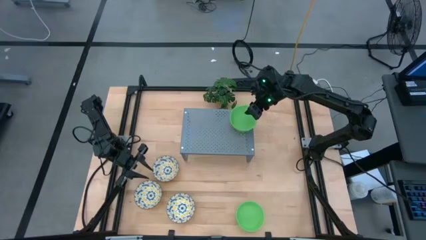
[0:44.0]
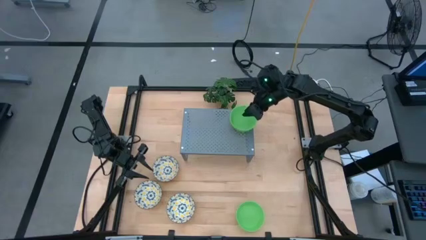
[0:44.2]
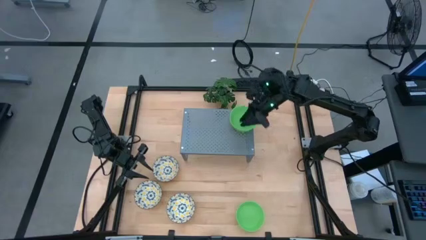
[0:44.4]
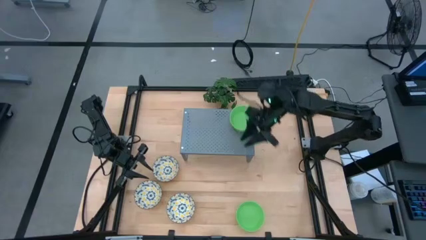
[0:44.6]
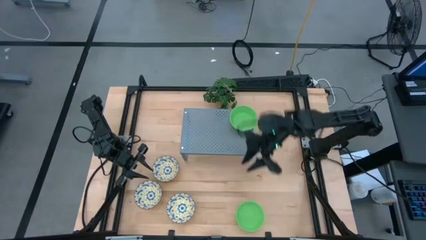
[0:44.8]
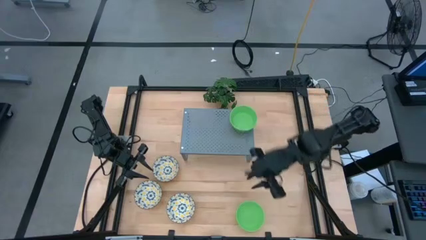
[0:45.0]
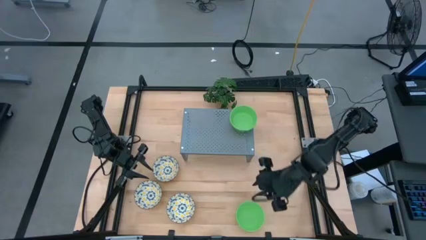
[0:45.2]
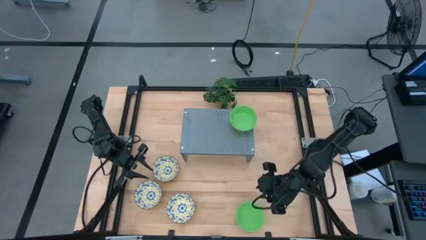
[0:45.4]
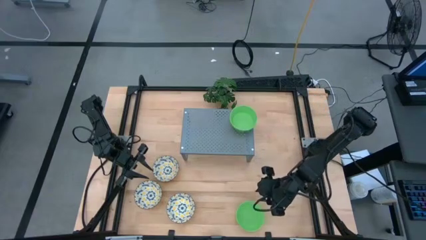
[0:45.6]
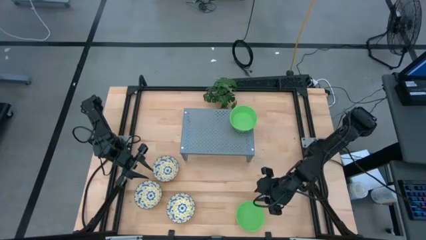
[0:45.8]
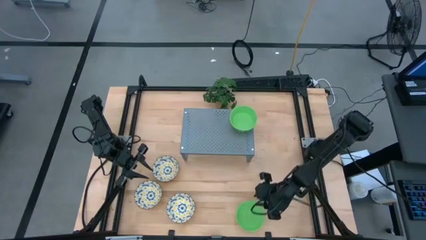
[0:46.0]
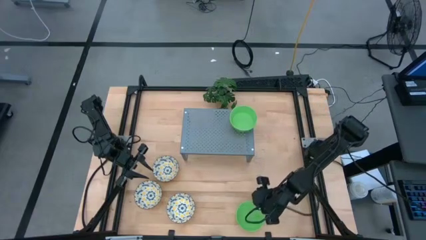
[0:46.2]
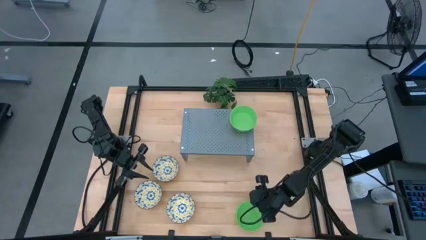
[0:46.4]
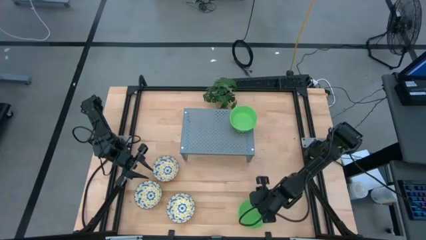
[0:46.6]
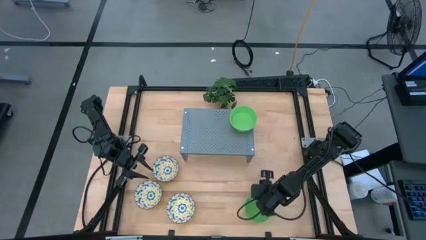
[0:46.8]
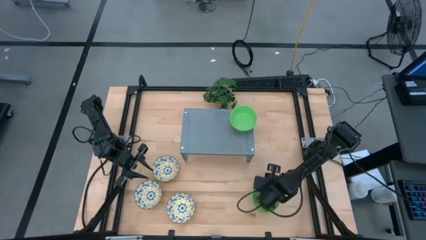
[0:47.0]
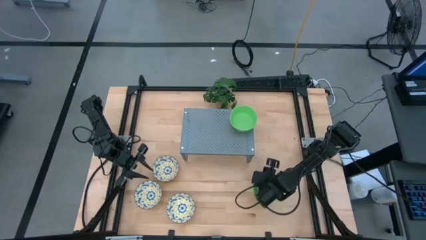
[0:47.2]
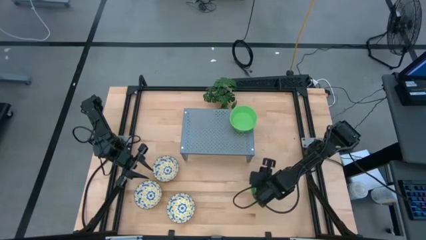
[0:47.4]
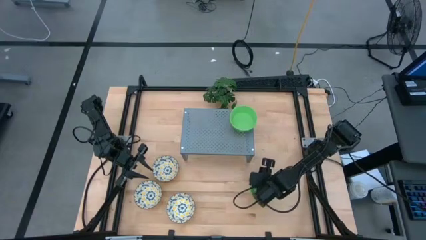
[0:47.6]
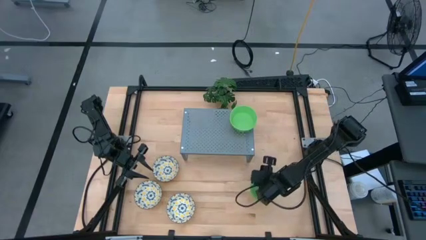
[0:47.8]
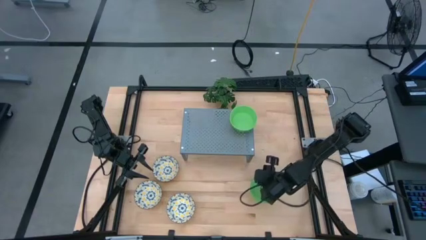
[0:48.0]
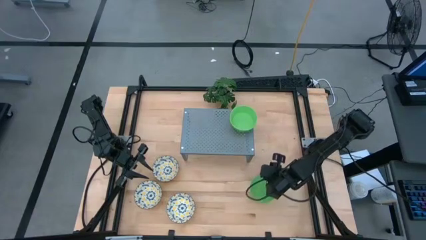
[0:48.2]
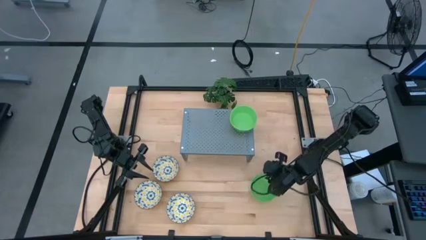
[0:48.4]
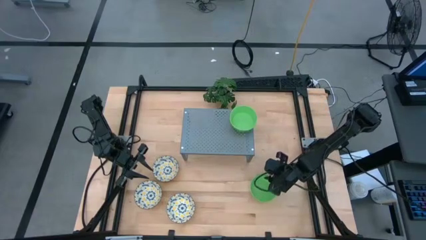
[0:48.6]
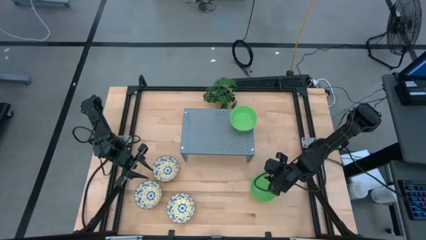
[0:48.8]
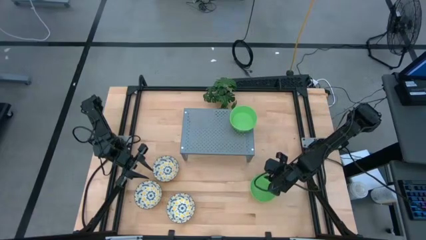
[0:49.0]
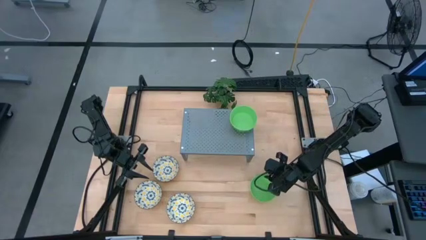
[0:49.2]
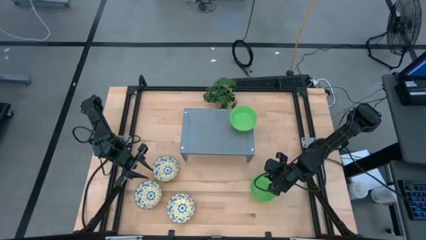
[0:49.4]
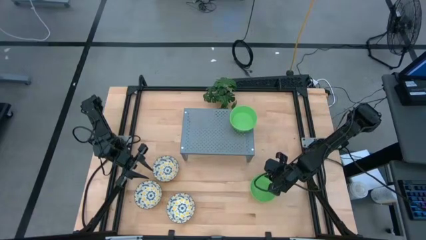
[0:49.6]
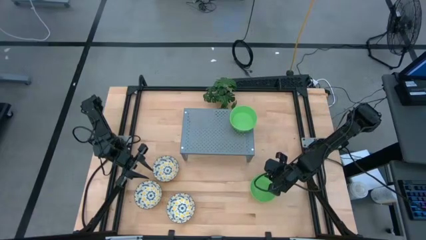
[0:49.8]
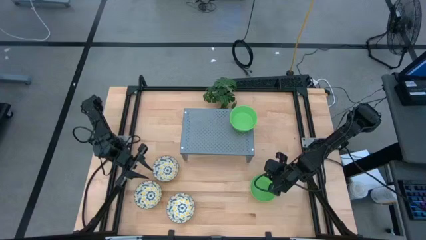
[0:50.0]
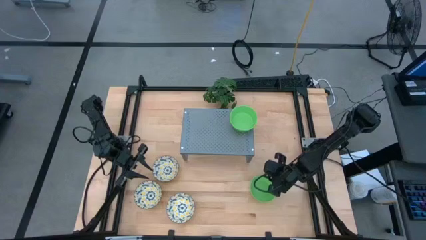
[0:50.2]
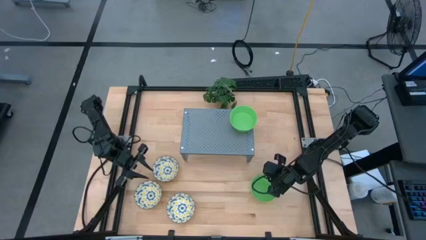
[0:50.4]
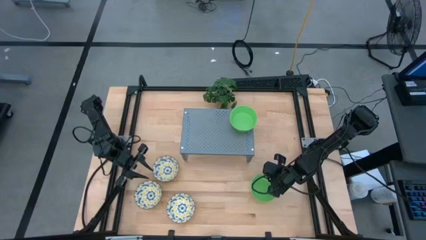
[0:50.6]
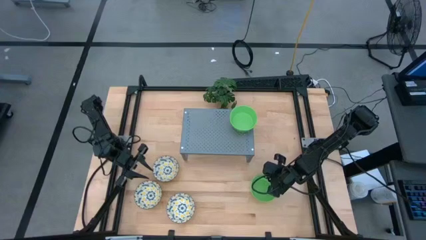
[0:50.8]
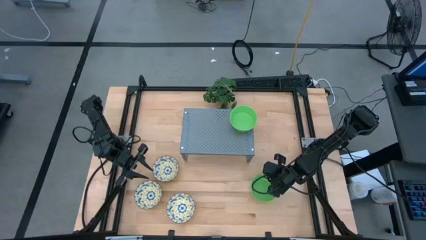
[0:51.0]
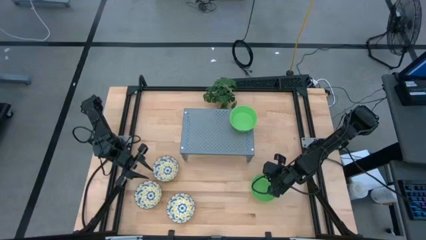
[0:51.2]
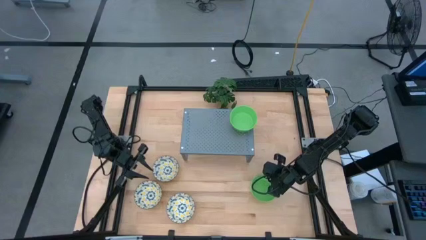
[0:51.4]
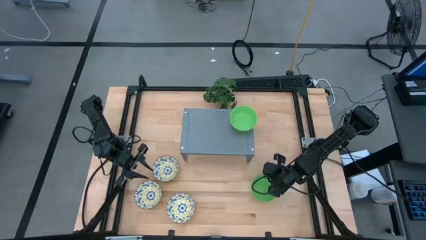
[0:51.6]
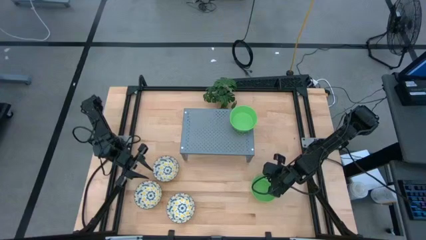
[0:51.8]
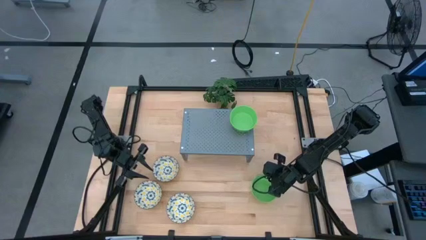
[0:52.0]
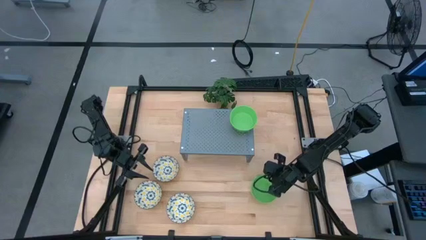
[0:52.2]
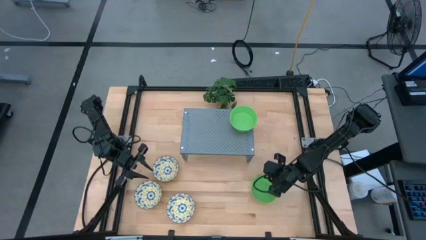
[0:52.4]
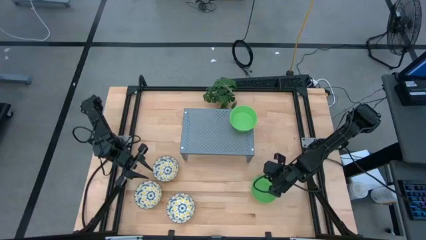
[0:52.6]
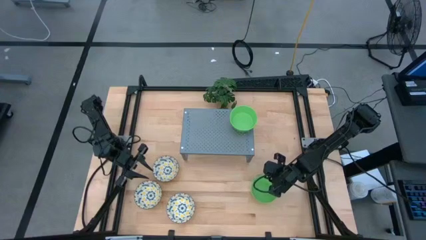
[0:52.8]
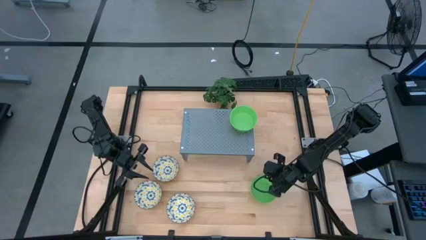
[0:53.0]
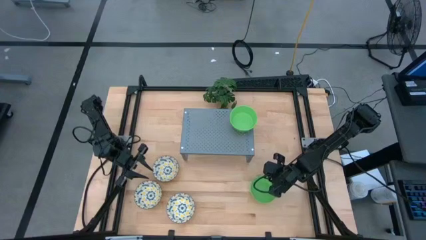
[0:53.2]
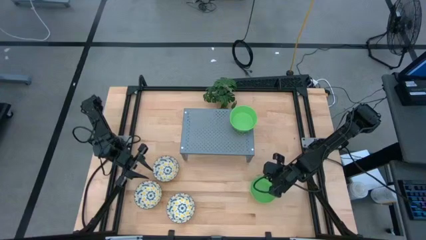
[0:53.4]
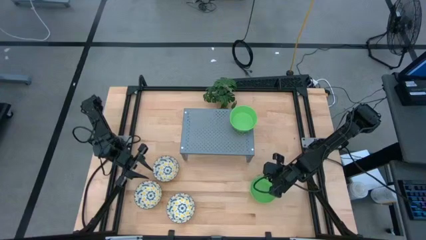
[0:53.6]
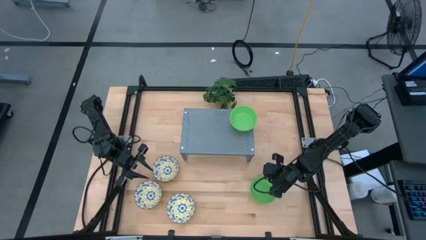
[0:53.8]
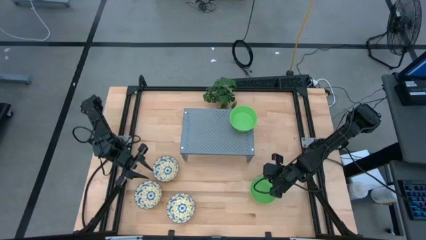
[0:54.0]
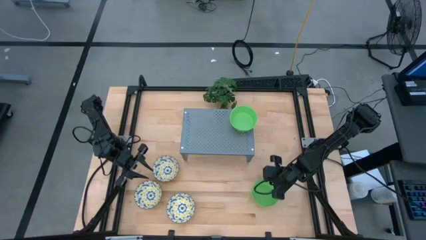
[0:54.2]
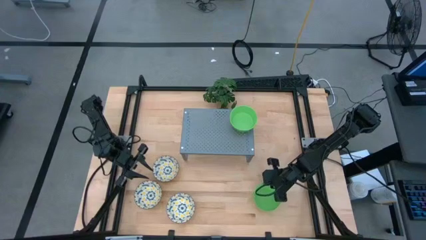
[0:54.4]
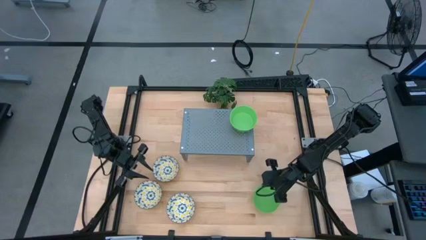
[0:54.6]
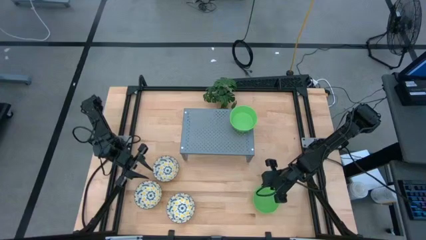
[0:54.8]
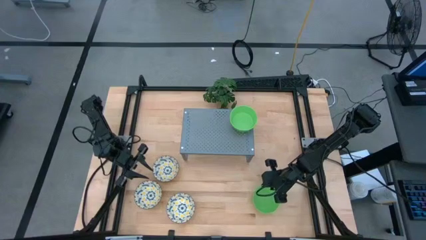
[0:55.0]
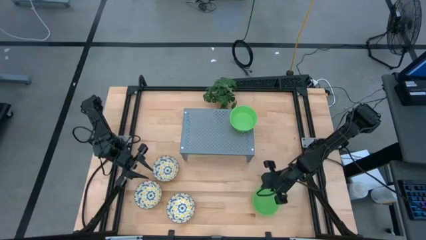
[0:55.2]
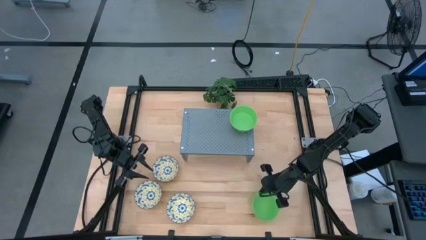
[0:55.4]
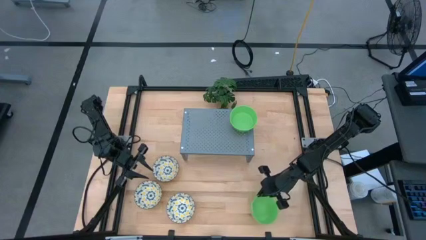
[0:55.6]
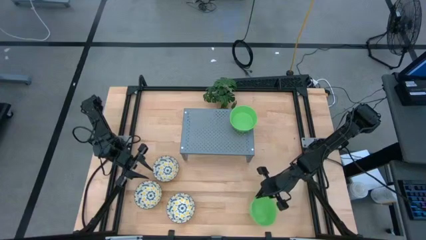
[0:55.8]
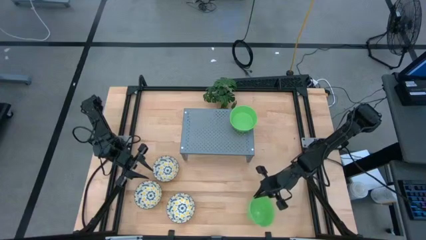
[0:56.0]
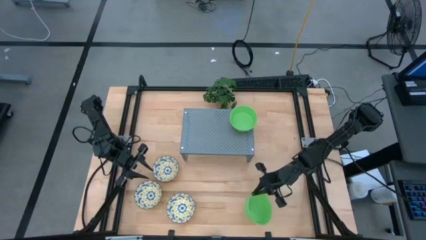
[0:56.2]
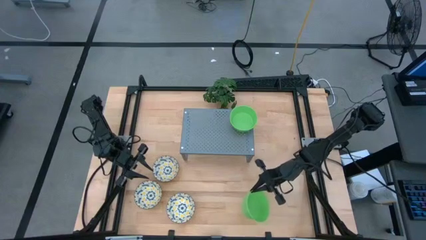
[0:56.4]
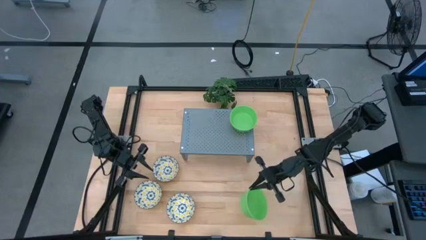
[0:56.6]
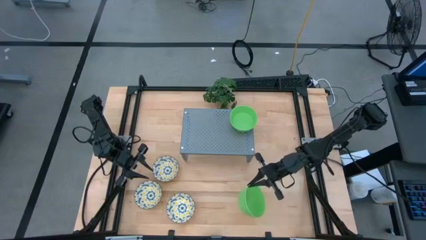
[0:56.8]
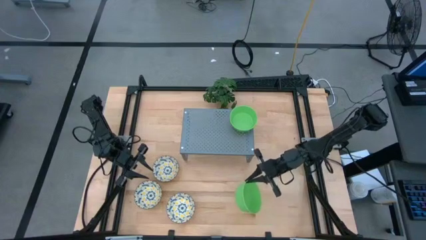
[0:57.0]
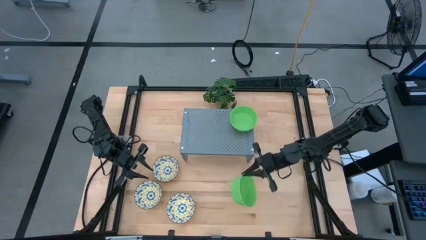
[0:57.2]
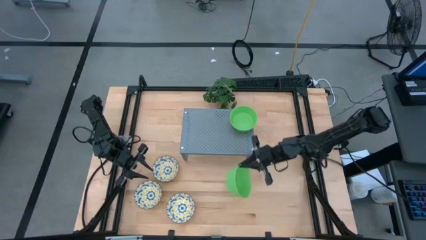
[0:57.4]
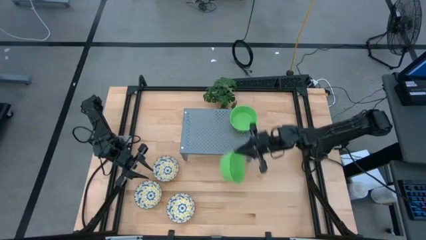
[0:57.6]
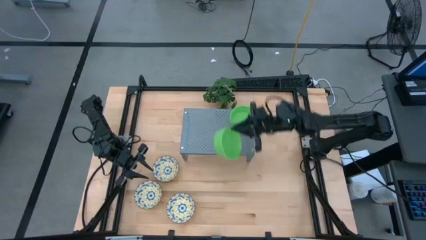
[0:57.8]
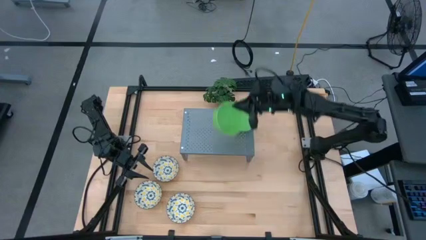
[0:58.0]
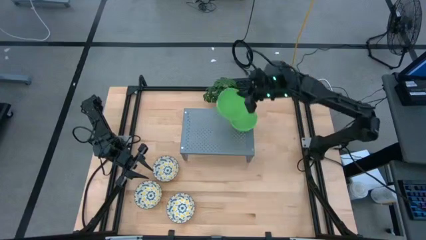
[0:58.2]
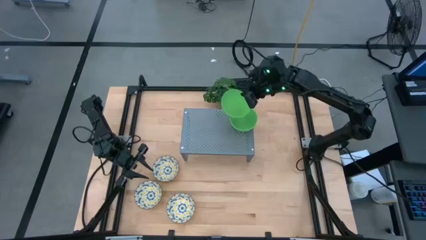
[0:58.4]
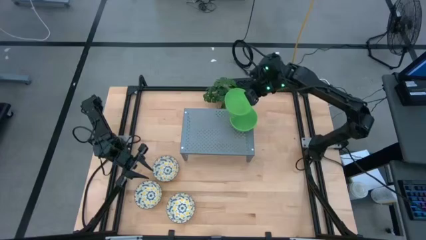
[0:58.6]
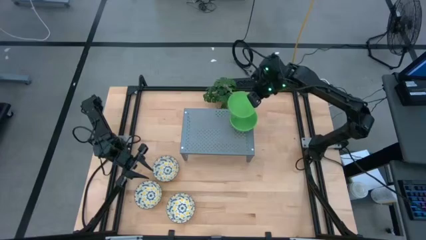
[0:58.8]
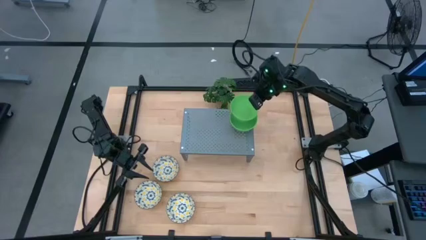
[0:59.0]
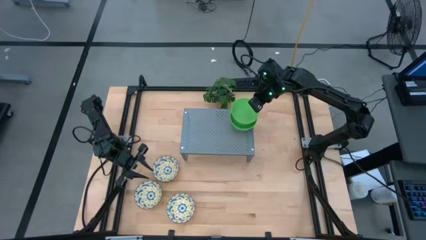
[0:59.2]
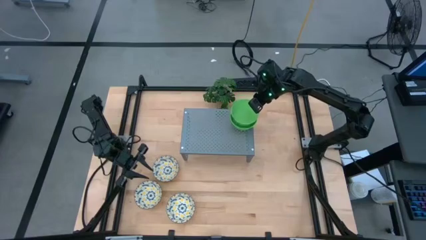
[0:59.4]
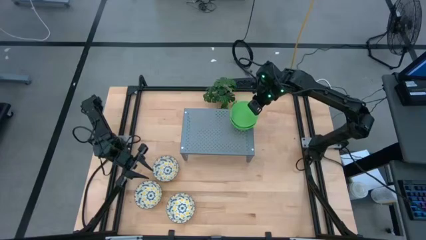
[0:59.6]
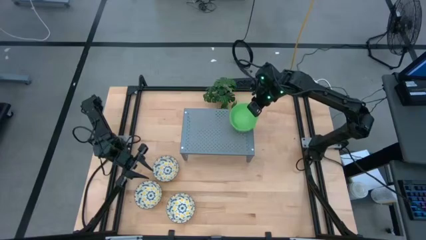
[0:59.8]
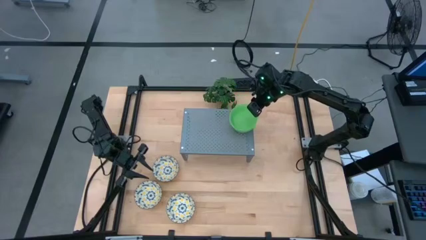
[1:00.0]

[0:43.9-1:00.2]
Task: Pick & Place Mini bowls
Stack the green bowl on the green bowl on the shelf

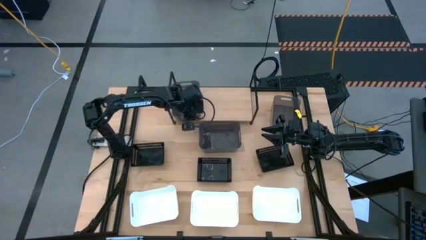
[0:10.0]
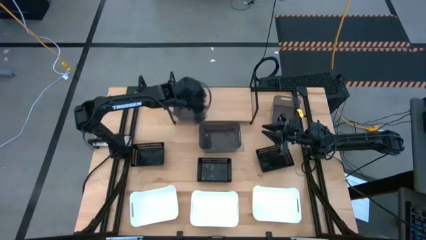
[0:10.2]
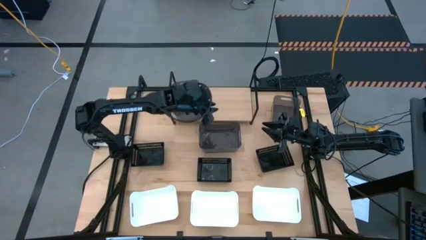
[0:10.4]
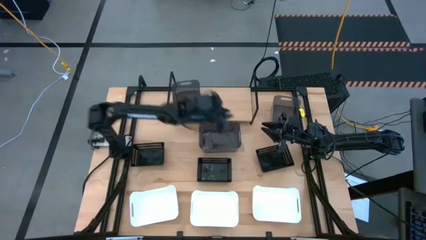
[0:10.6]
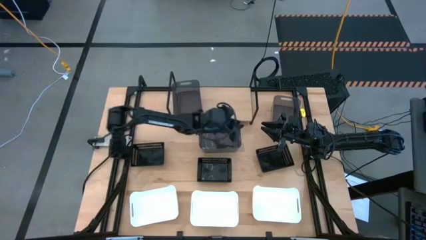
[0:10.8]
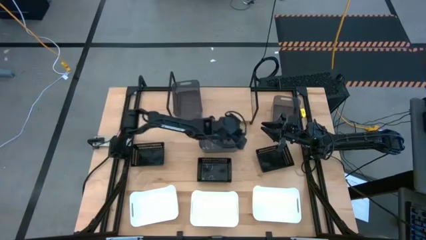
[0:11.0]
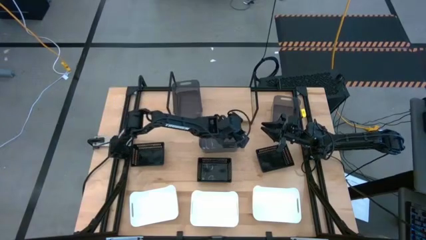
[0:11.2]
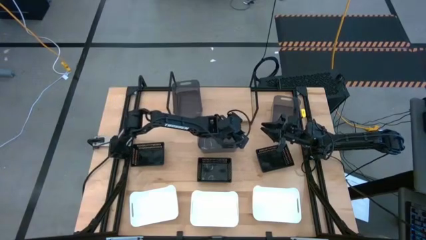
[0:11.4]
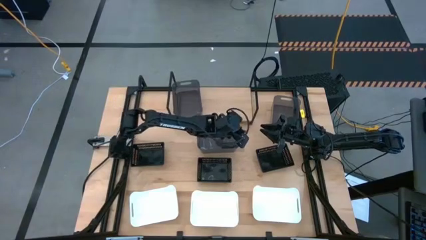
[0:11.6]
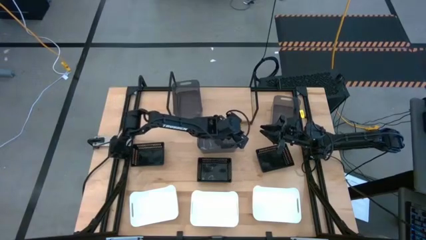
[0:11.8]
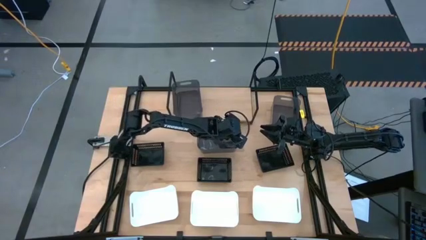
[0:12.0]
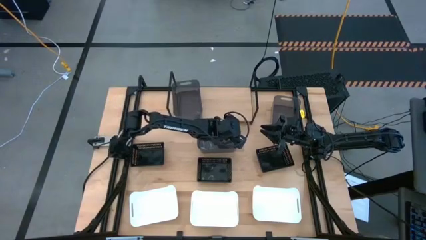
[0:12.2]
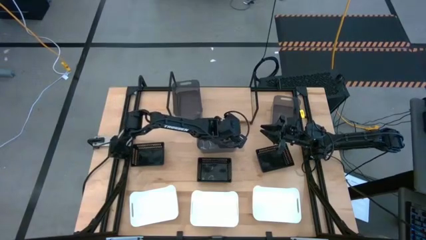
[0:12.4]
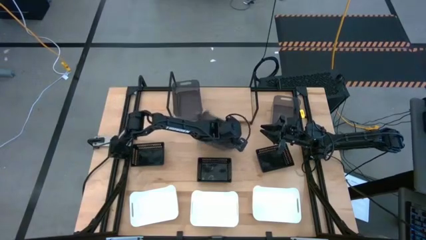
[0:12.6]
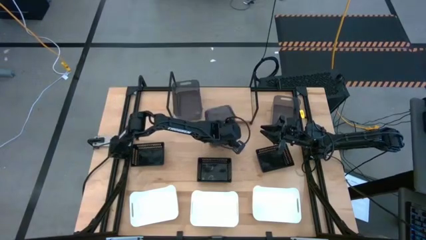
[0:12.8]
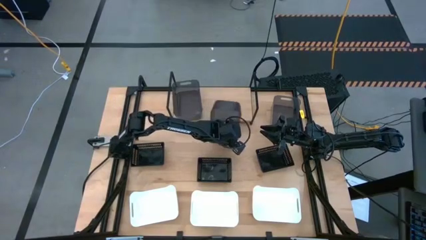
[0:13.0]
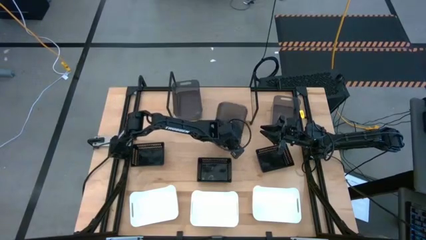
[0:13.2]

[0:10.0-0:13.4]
Task: Stack baskets on shelf by color
Stack the left gray bin on top of the gray bin
